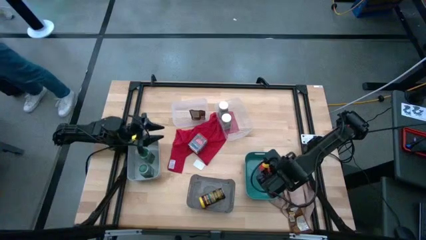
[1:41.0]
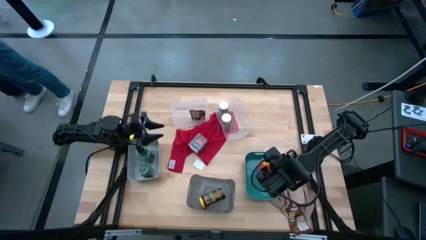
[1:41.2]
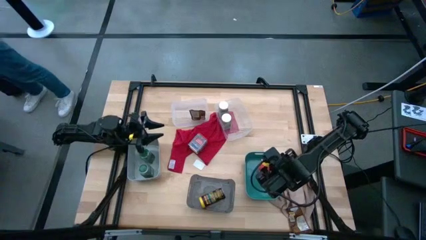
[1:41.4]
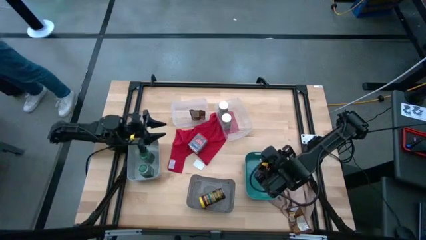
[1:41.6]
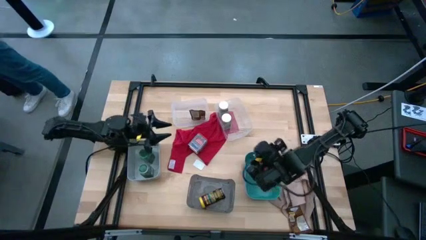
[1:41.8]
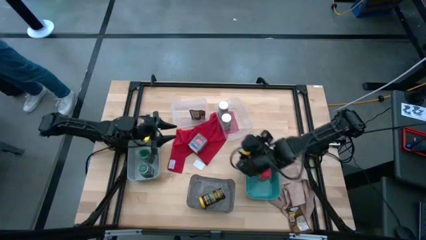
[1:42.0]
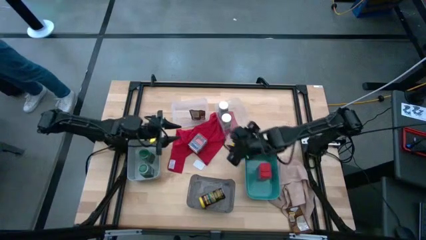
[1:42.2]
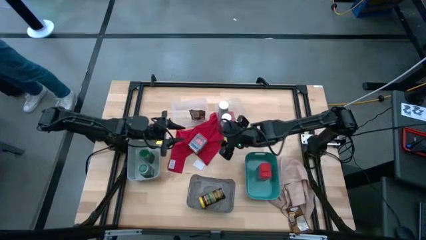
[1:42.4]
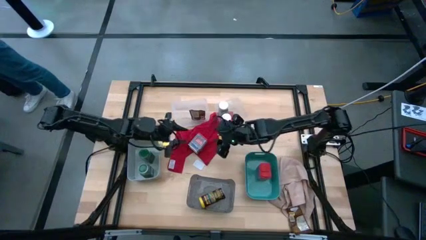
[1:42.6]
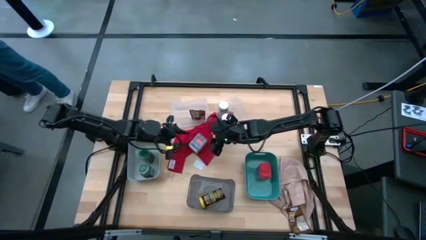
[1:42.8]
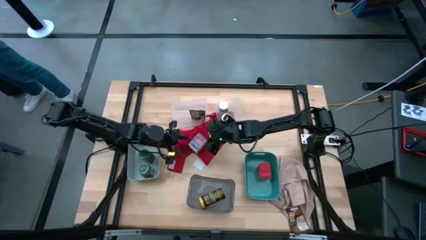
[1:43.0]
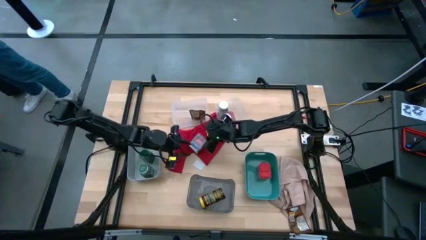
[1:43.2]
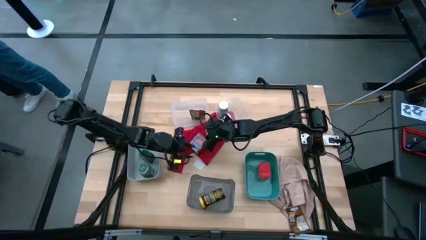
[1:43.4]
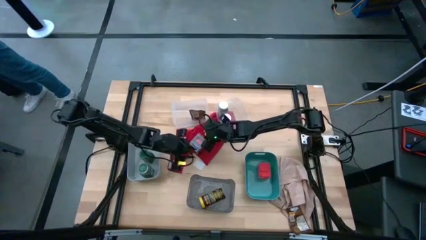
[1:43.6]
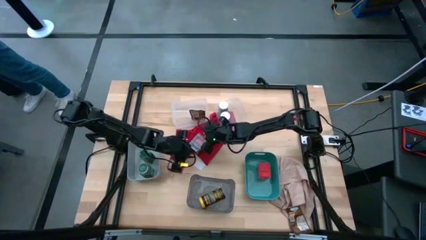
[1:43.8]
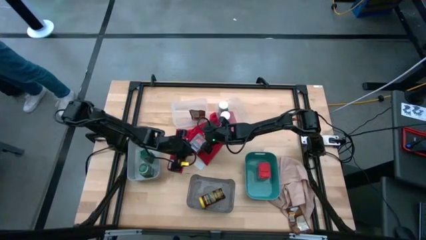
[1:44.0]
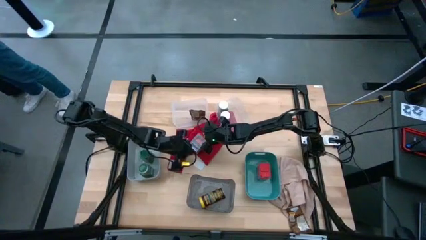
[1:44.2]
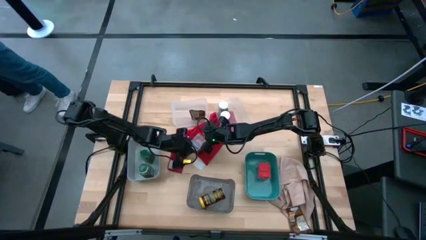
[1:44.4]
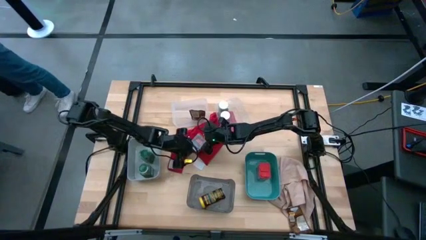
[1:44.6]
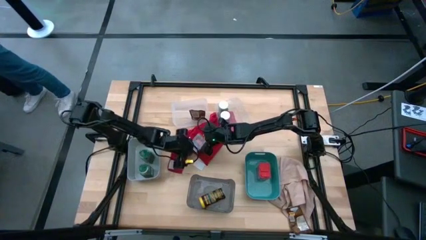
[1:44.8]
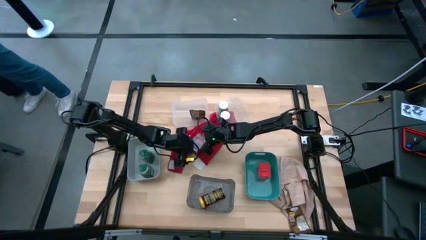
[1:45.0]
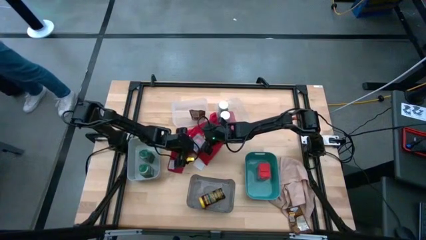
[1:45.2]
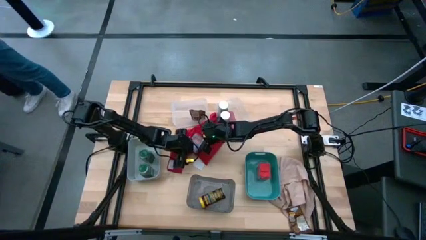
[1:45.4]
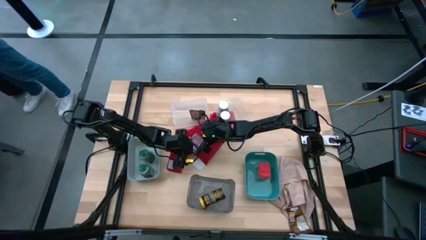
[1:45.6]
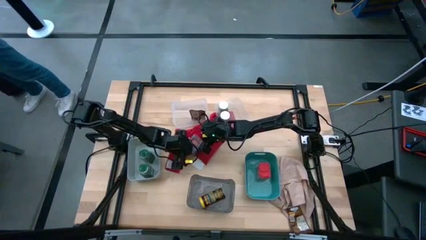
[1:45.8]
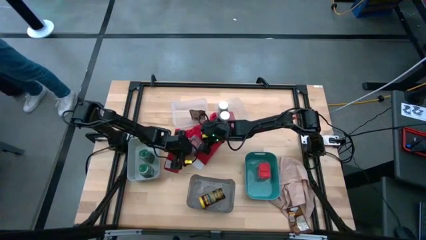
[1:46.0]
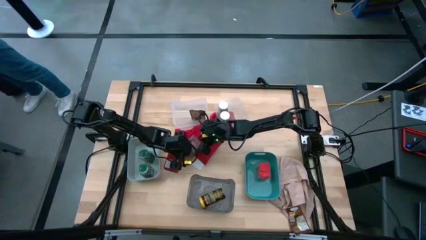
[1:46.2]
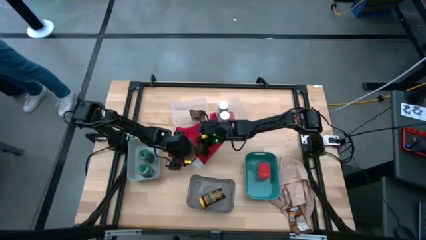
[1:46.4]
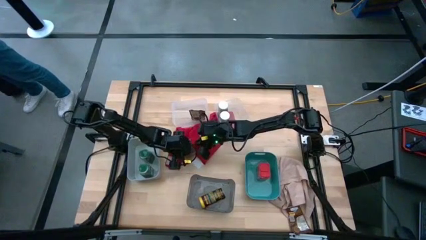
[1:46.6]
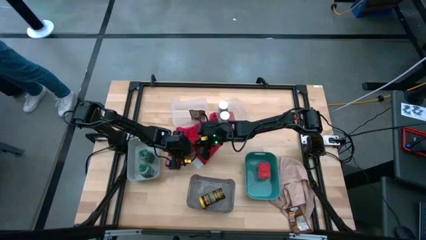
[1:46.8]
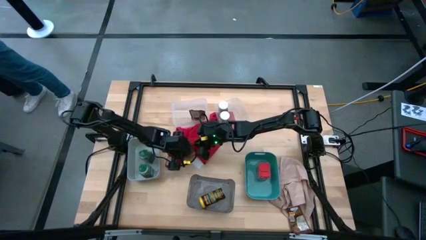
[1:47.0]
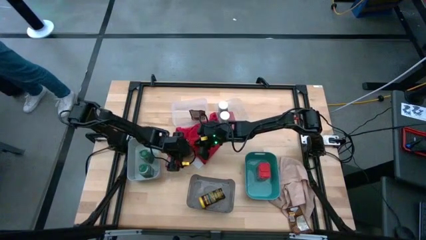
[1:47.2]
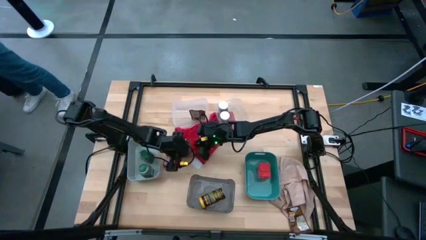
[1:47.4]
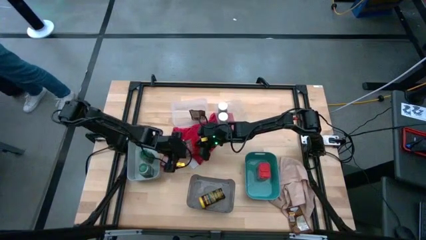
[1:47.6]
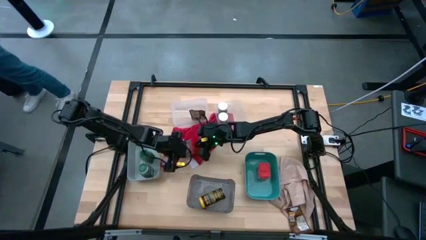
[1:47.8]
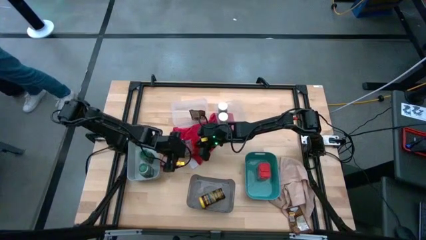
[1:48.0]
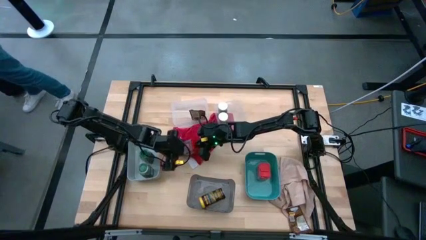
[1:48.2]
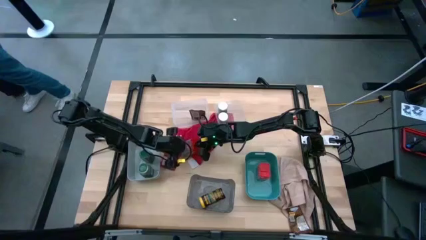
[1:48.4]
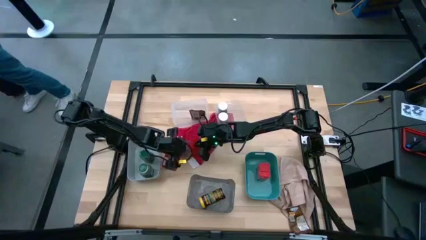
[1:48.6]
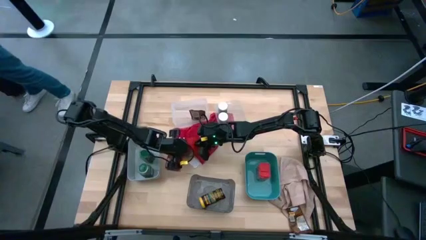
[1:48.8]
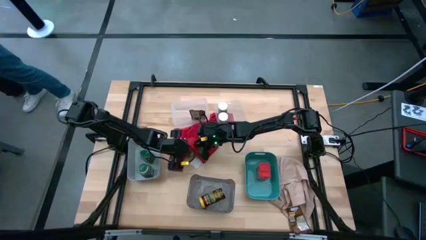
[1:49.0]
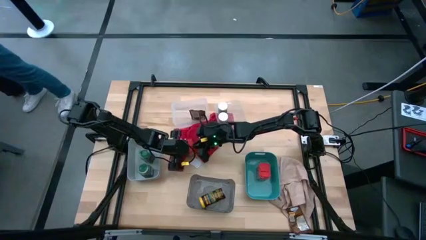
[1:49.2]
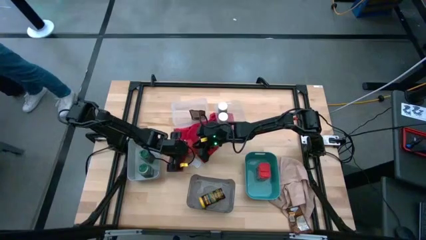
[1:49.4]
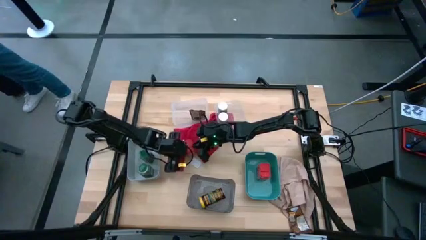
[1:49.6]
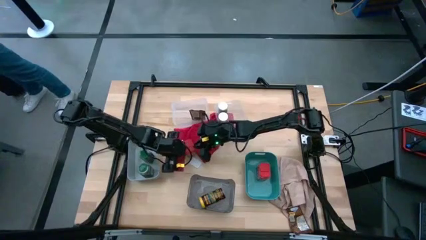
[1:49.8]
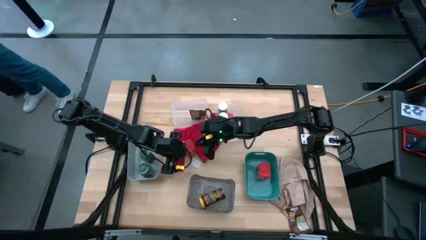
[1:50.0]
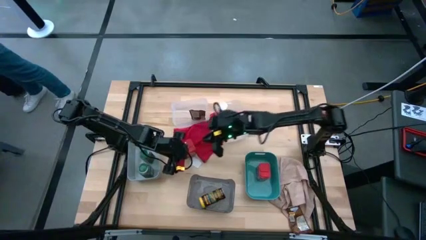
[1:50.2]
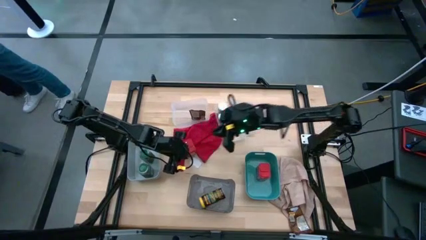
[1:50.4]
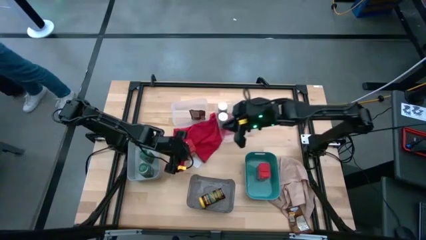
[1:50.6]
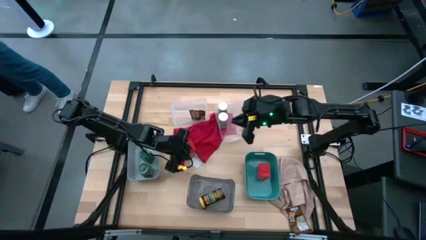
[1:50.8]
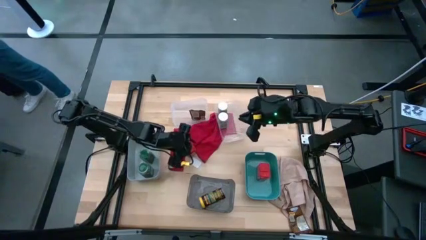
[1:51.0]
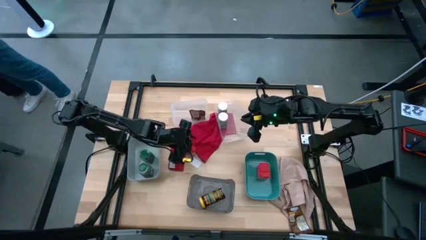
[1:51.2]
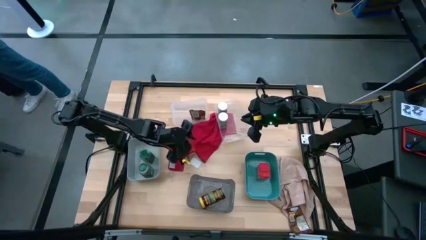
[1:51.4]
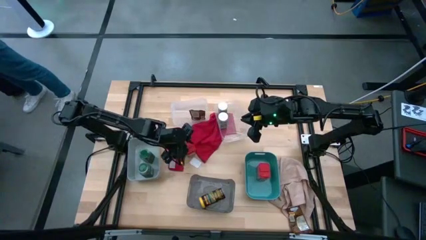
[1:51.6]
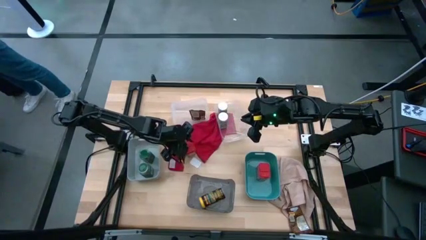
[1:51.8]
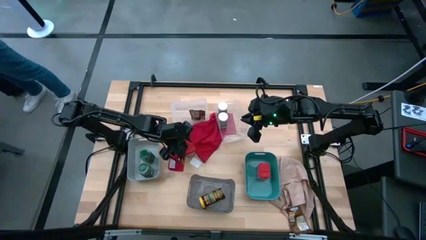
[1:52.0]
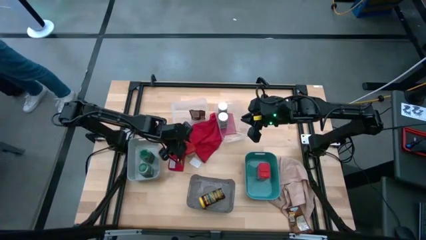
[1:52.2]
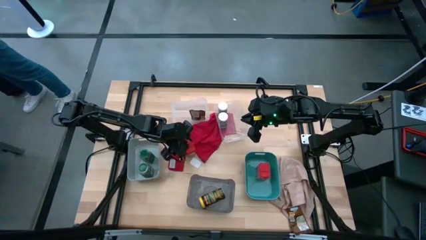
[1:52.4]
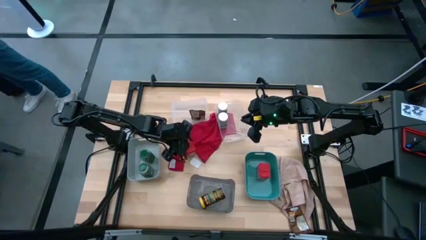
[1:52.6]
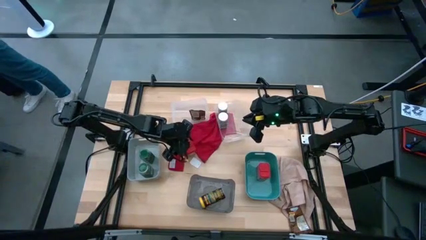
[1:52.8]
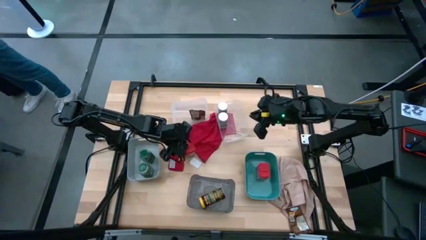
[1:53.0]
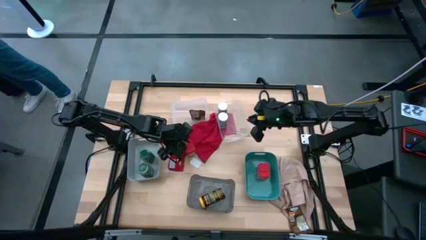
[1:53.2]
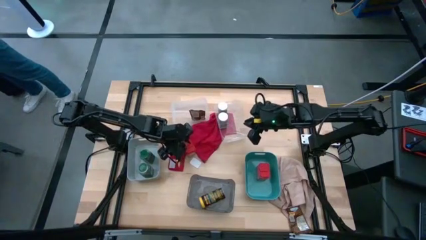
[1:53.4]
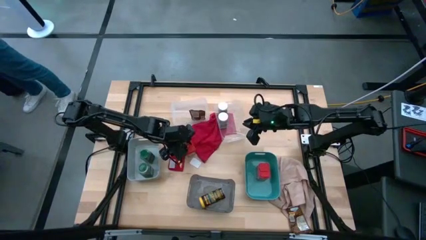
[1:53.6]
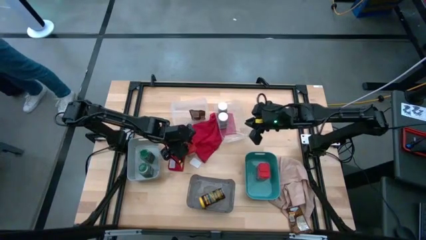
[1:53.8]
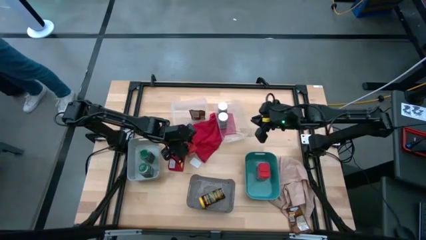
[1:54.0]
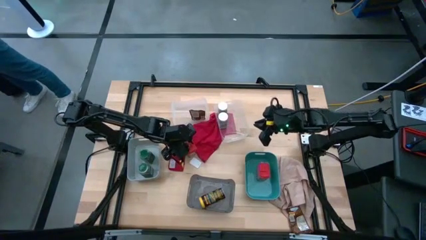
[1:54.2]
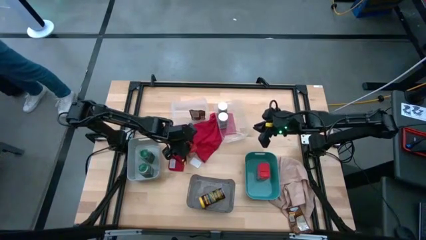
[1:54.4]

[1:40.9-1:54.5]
Task: Sort spices by type
Put the red seasoning can into the green bin

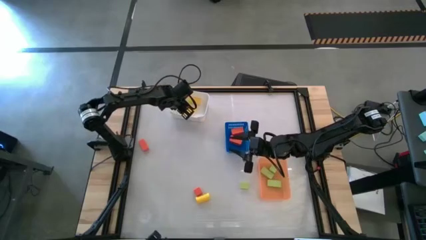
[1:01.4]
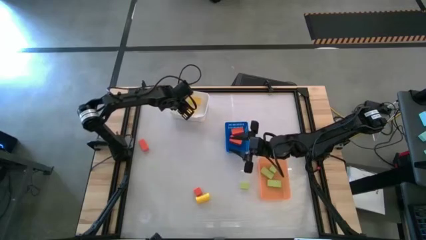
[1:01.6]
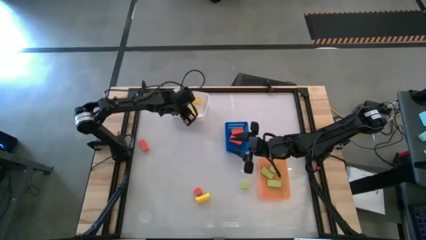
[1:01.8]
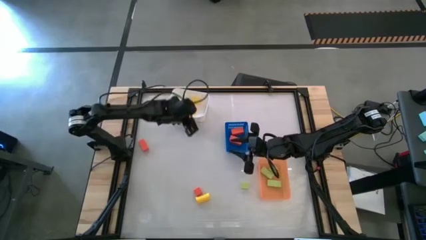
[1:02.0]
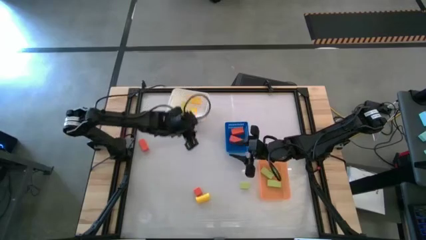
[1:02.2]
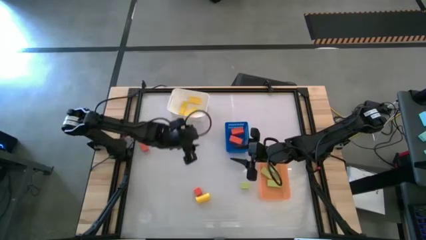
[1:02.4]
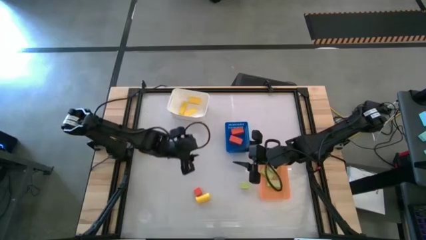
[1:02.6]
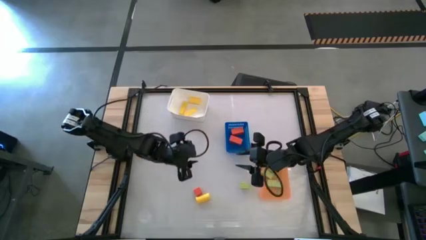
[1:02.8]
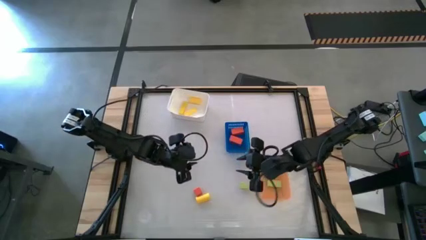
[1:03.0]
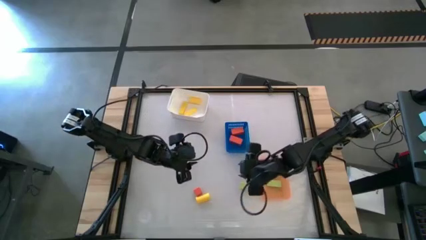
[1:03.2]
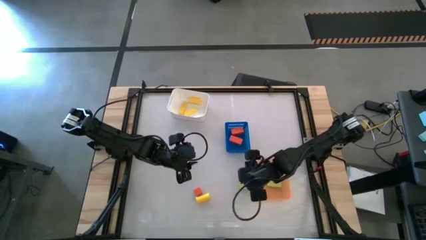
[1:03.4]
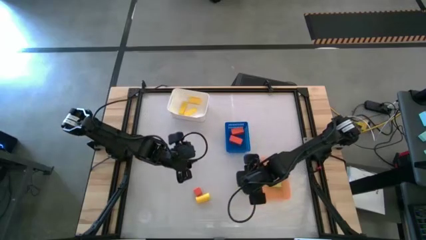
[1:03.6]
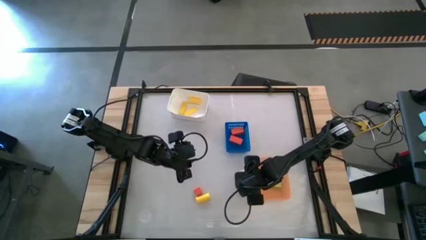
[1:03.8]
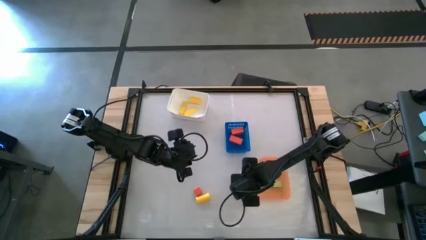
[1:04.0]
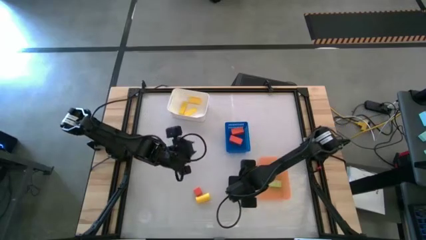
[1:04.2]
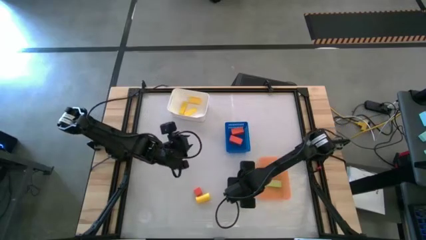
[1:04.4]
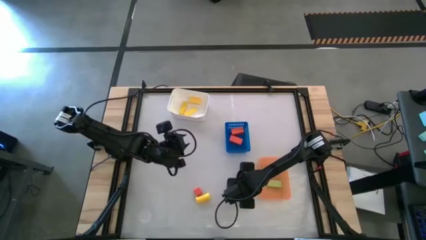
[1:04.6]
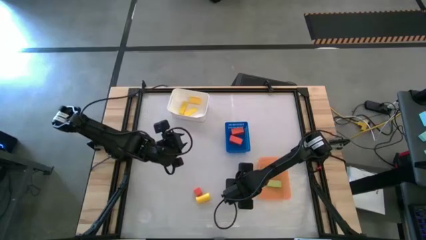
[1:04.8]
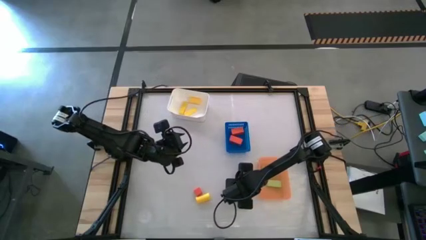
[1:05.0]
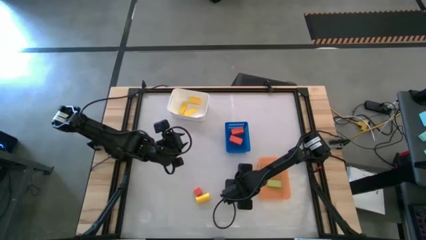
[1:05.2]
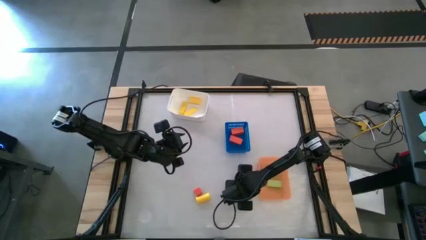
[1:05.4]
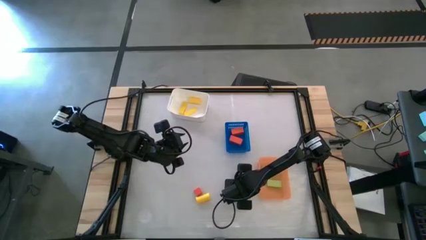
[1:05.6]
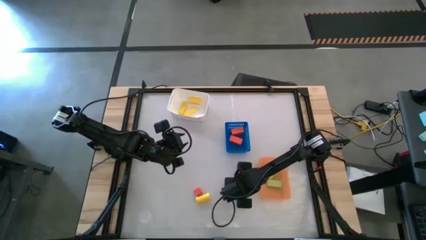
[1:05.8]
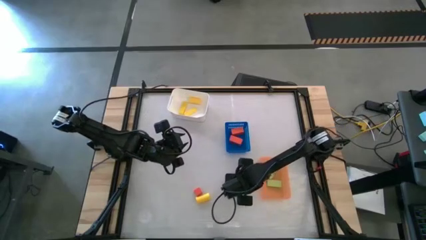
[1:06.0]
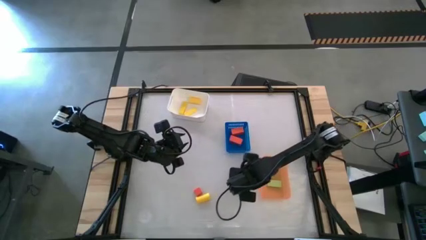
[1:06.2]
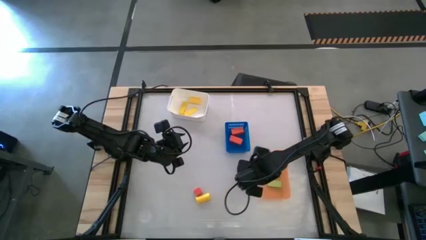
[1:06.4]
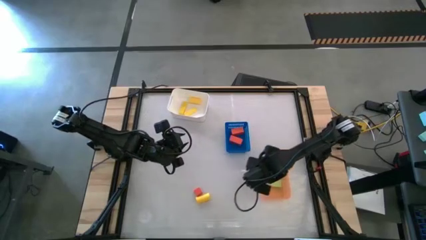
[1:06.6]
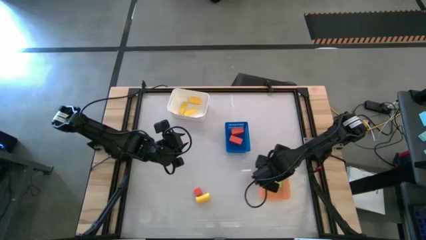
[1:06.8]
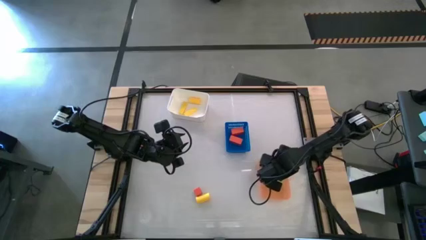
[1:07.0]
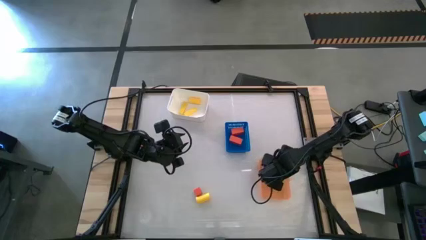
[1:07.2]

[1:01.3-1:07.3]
Task: Sort & place blocks by color
Put the green block into the orange bin
